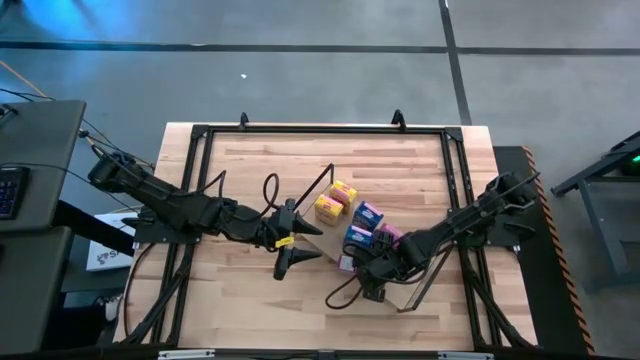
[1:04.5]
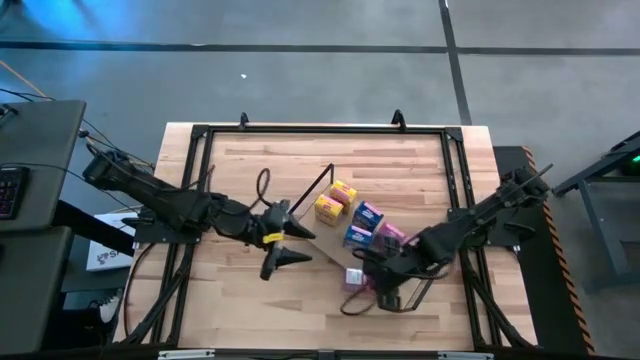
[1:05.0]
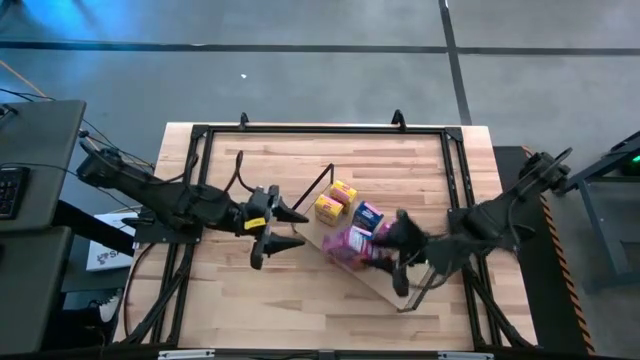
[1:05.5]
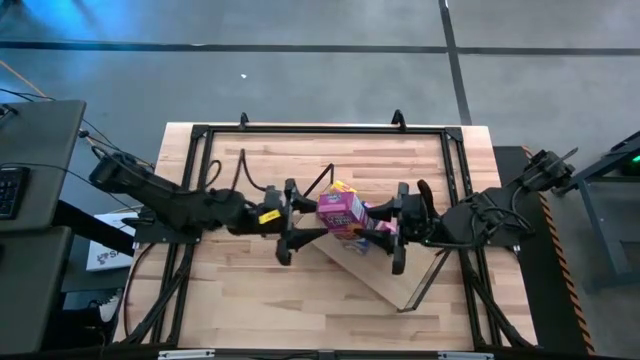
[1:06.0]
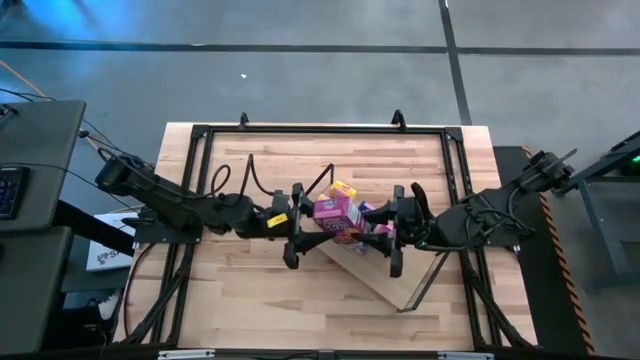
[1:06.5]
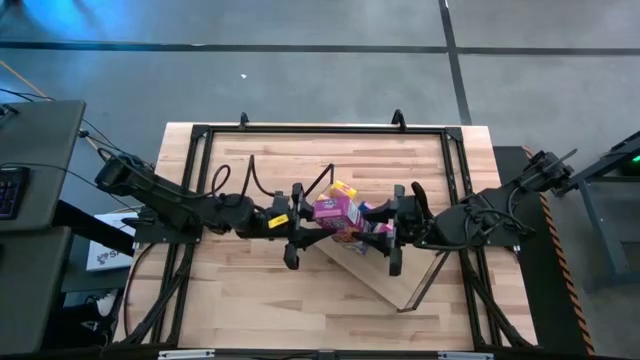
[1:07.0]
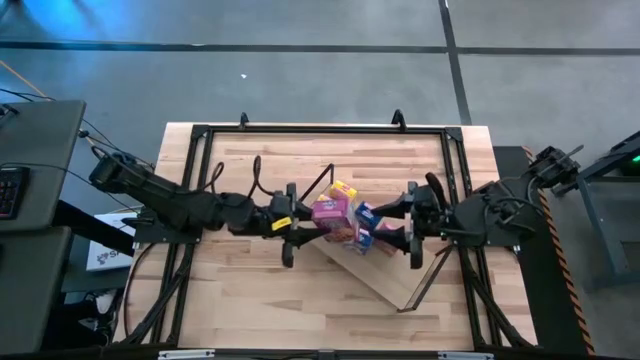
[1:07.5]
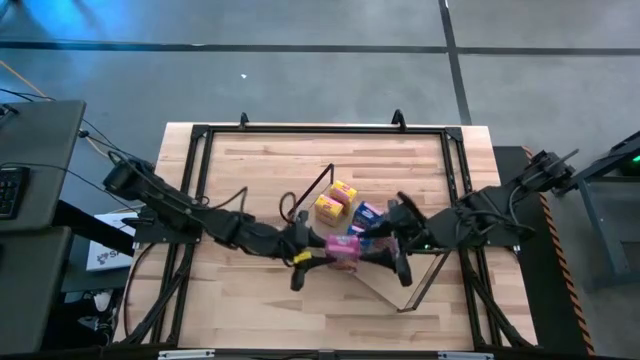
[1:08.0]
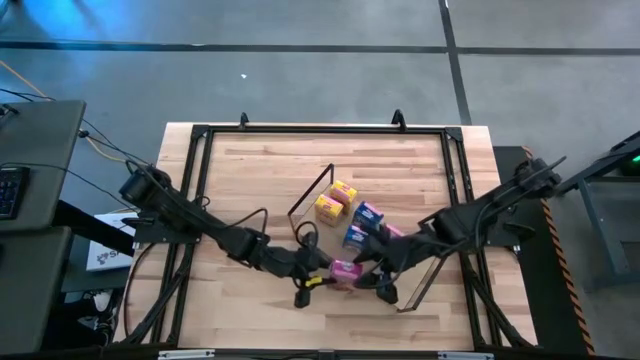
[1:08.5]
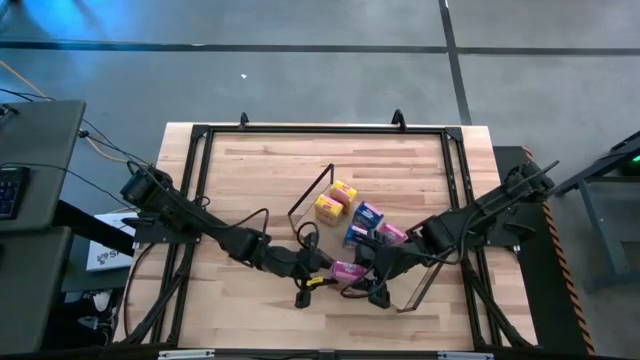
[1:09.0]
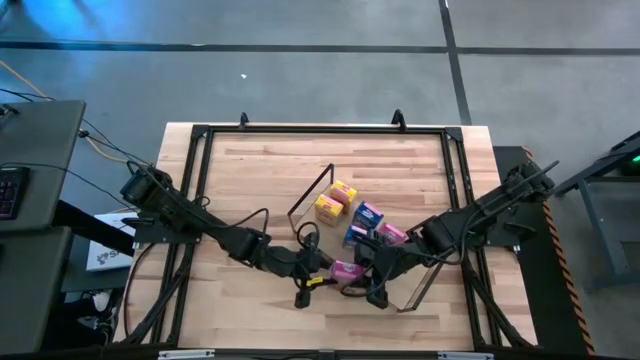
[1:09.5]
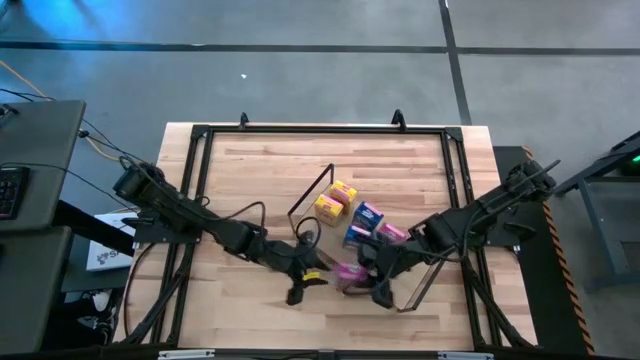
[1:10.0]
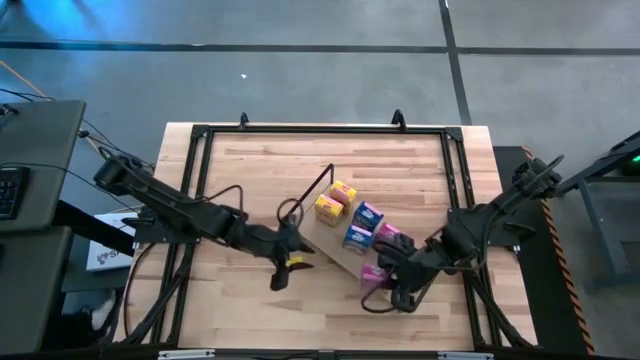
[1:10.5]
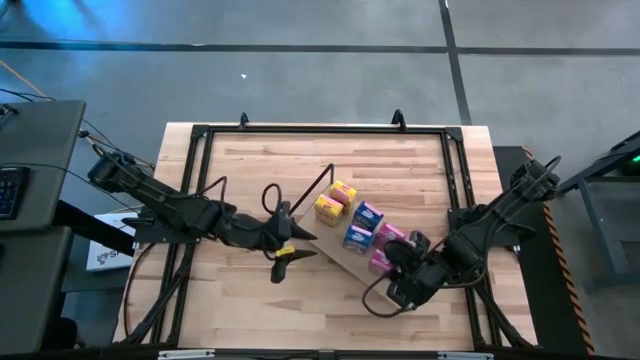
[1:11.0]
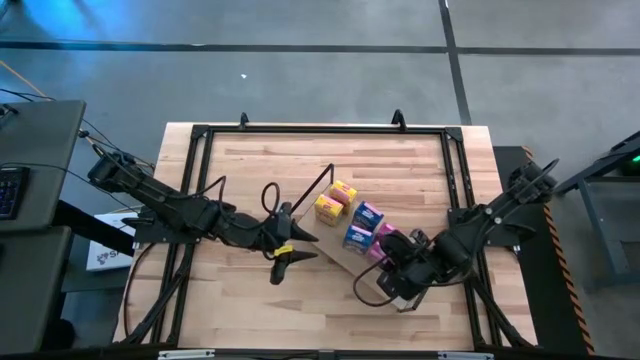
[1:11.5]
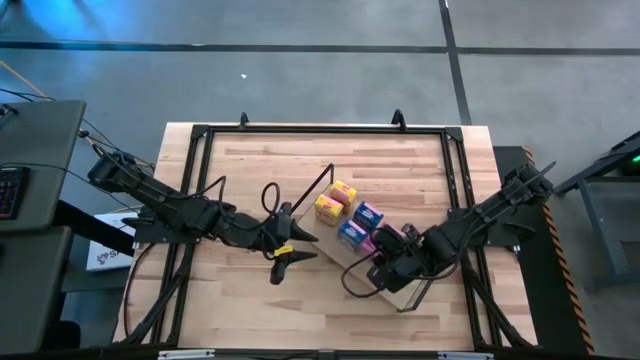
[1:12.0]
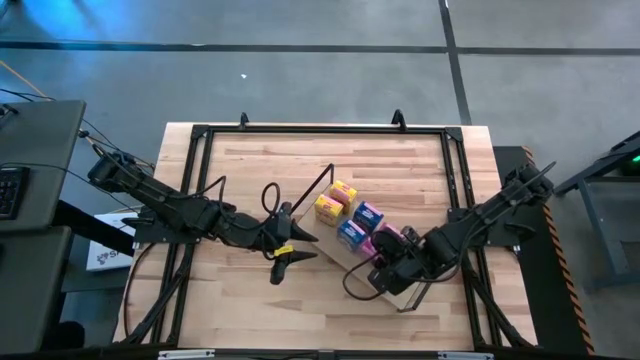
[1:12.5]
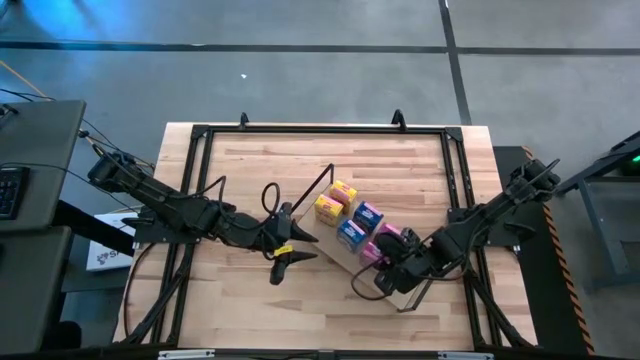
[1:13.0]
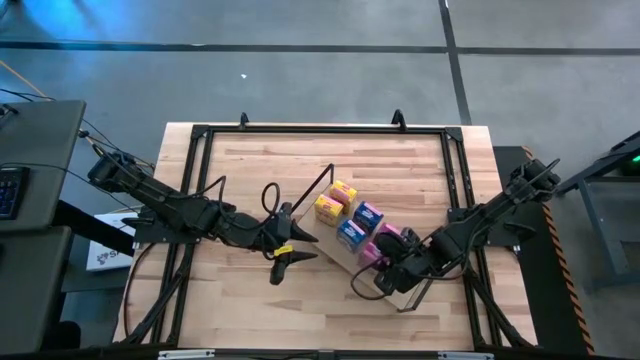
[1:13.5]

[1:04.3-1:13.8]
Task: Stack cereal on shelf
Put the bottom left purple cereal box on the shelf

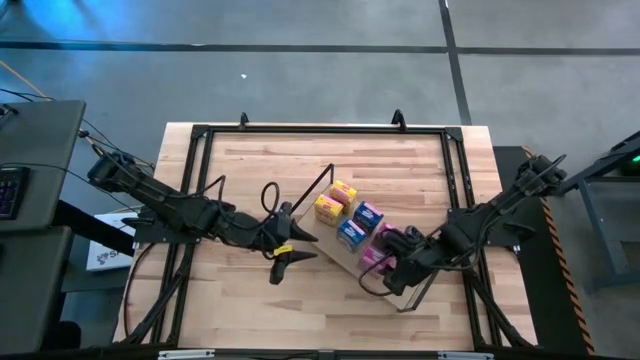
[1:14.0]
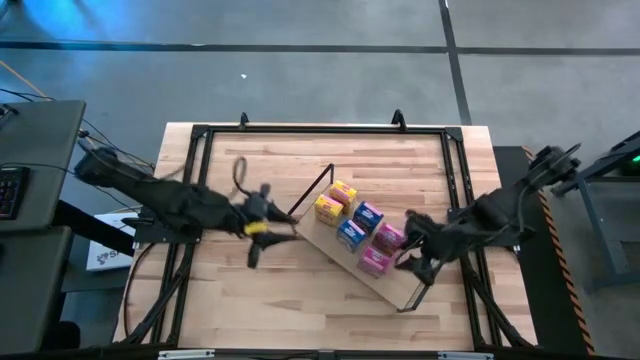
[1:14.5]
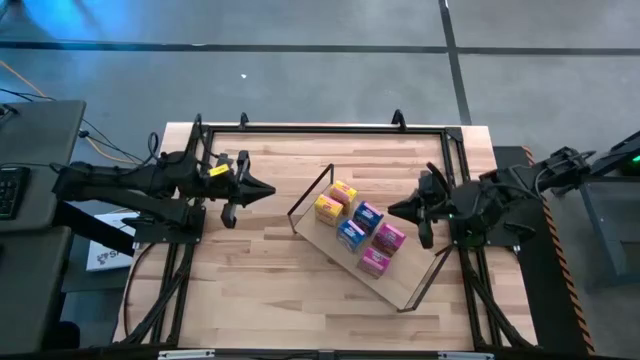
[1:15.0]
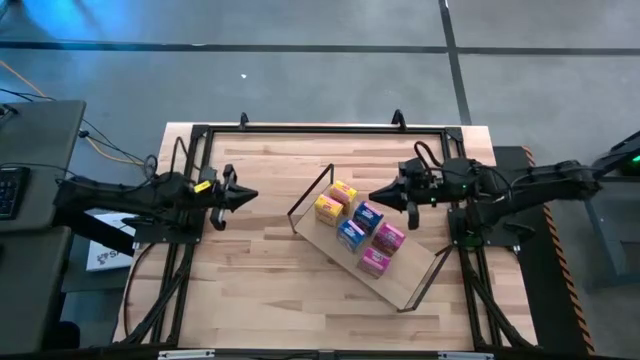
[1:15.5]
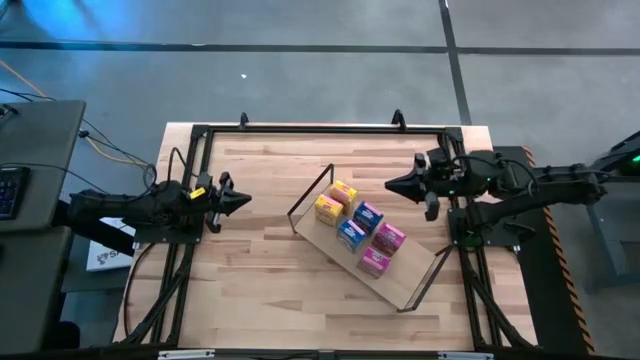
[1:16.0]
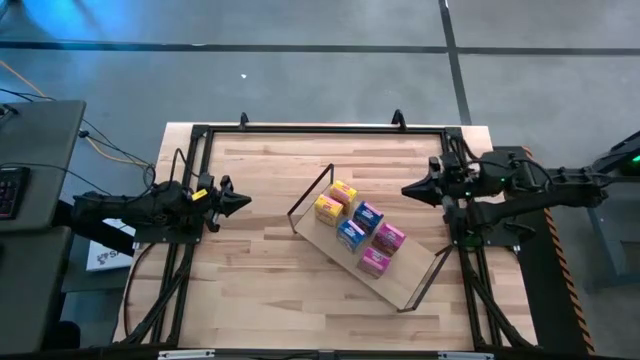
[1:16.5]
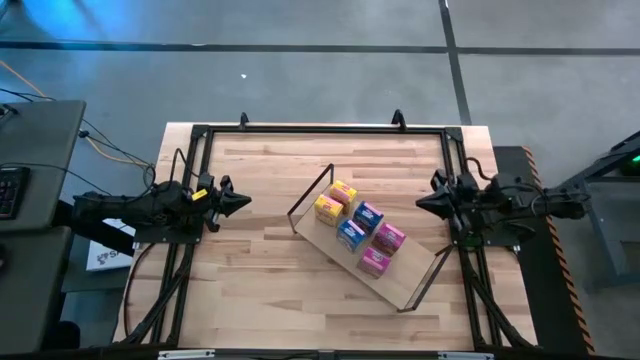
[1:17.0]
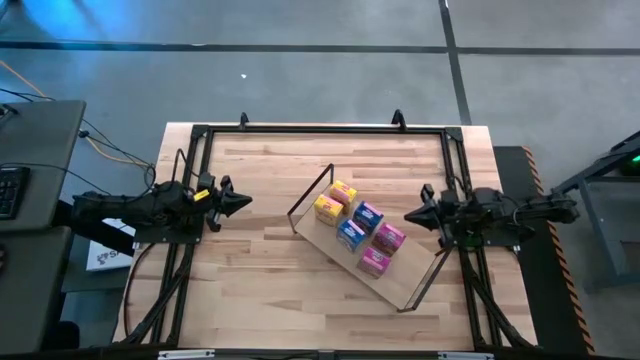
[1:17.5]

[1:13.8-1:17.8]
Return to Home Position

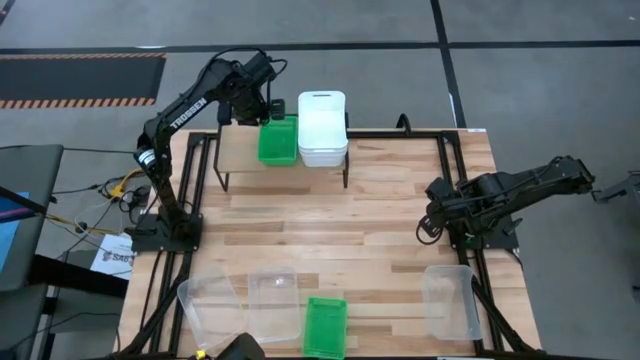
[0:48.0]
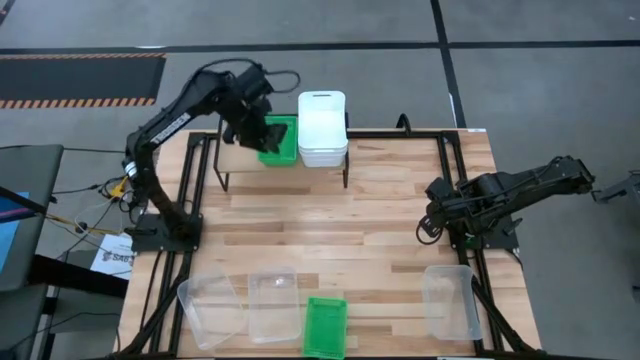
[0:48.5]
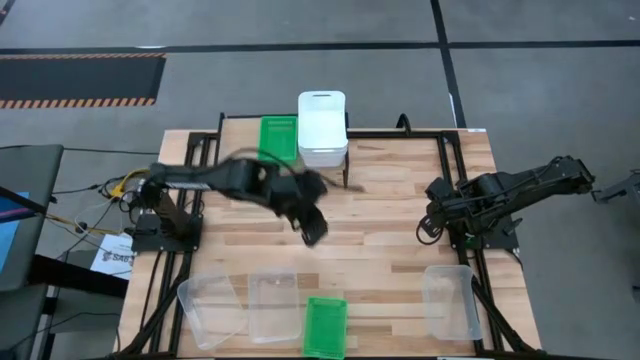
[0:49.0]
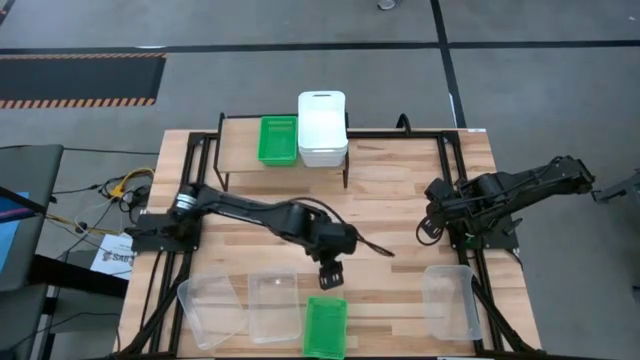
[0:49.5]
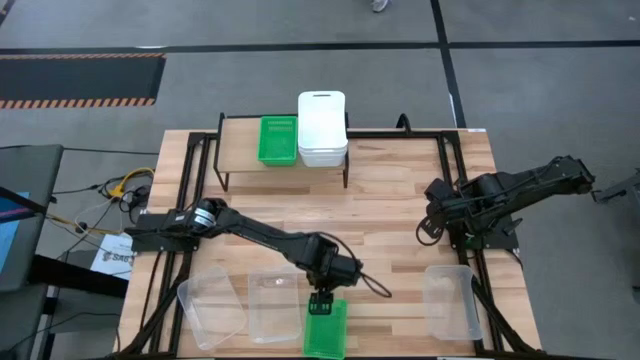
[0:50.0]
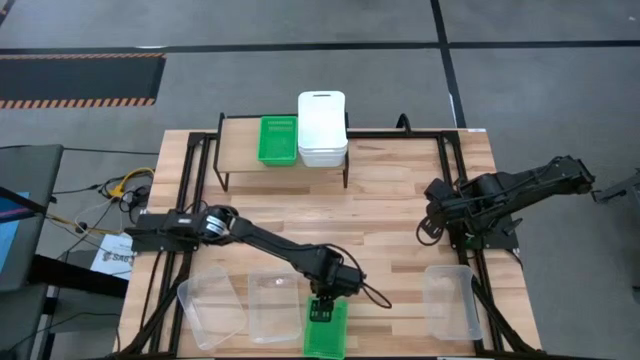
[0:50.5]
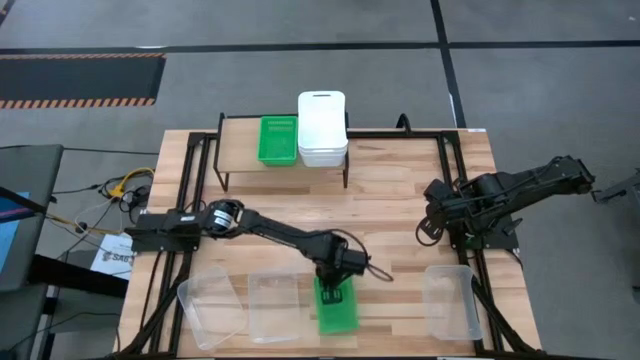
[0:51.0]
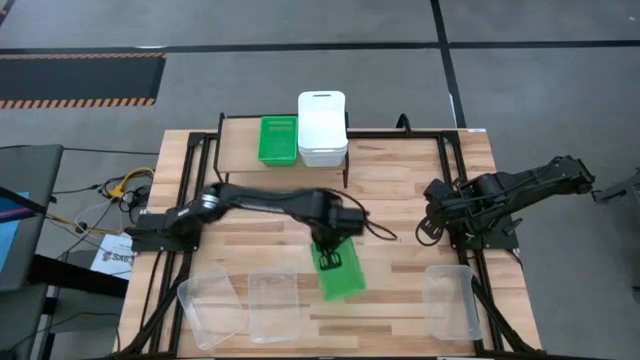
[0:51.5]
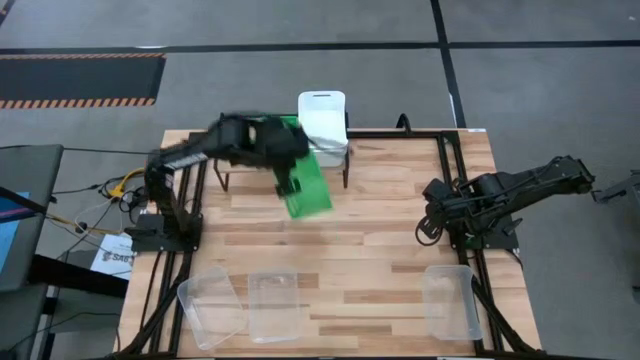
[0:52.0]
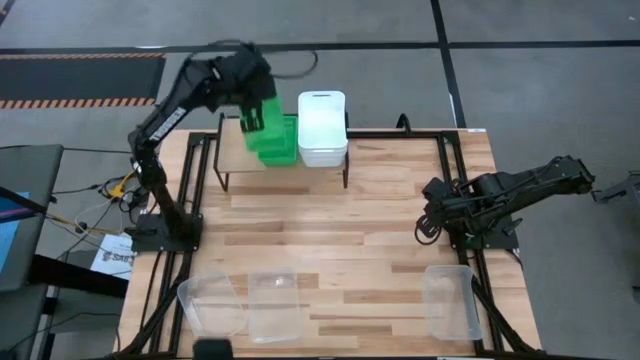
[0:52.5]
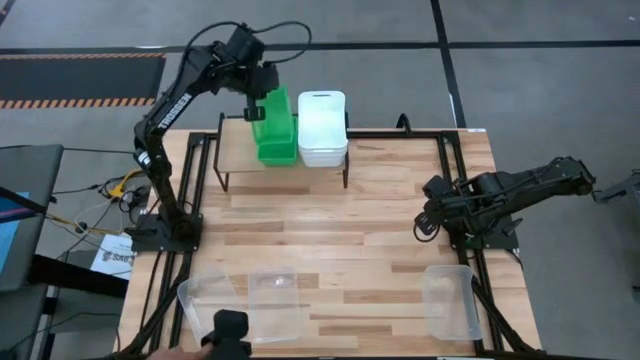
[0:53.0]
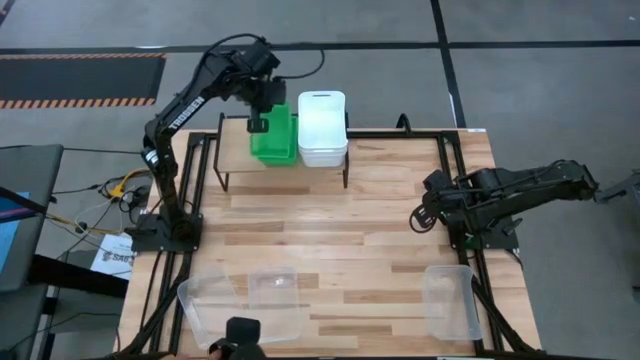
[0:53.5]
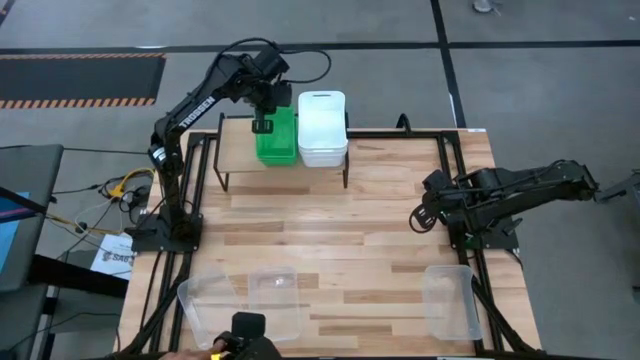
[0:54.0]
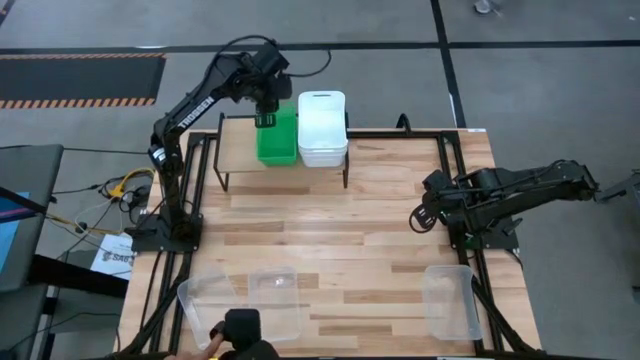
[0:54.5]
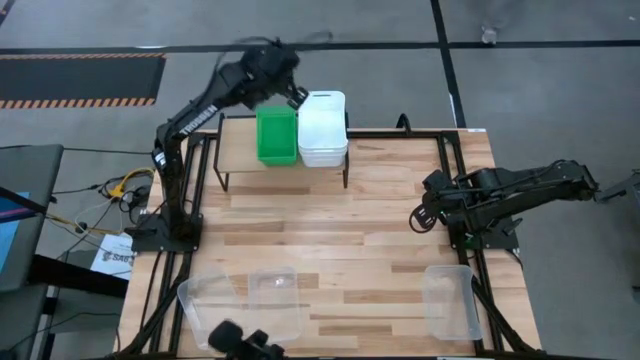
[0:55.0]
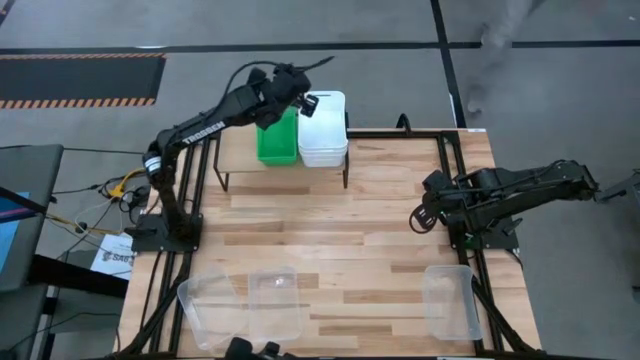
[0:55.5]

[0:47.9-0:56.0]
Task: Stack baskets on shelf by color
Stack the green bin on top of the green bins on the shelf

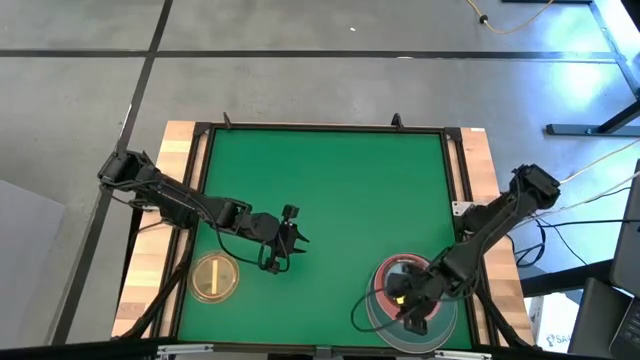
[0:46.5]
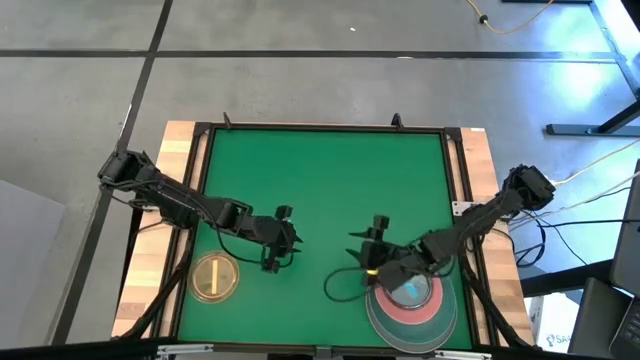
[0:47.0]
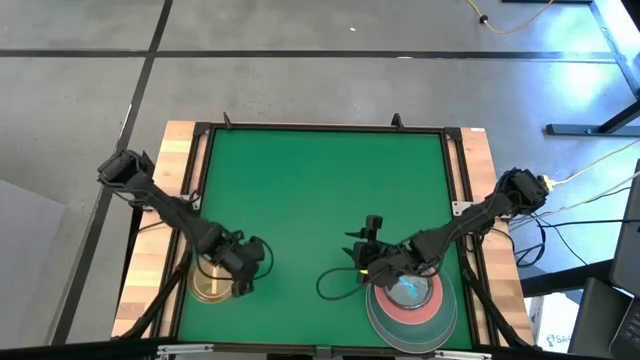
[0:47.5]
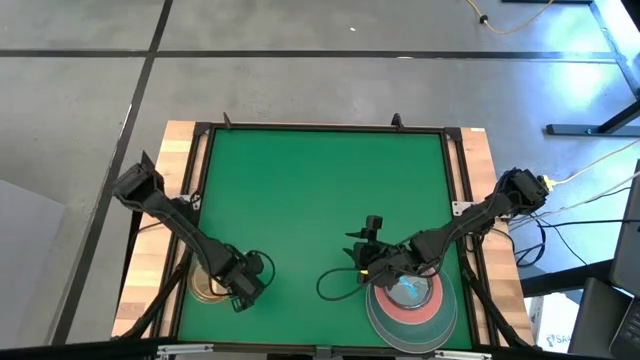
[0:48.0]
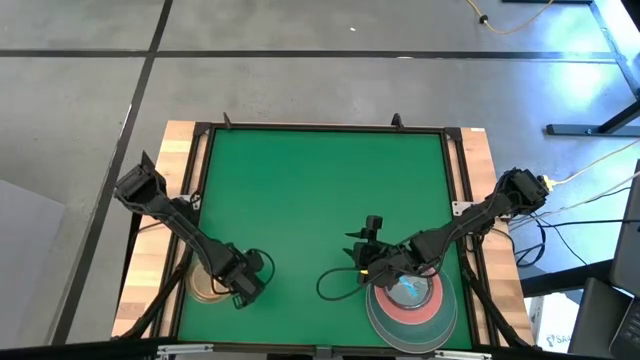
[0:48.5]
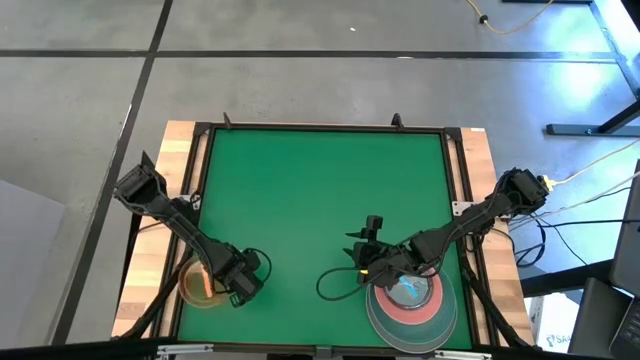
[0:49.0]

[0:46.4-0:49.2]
Task: Stack plastic plates
Stack the transparent orange plate on top of the transparent blue plate
